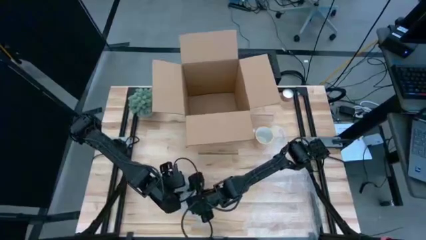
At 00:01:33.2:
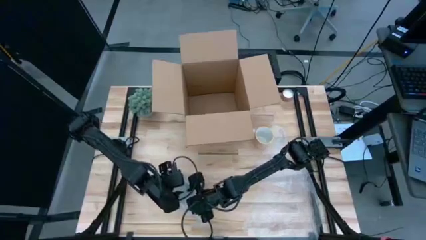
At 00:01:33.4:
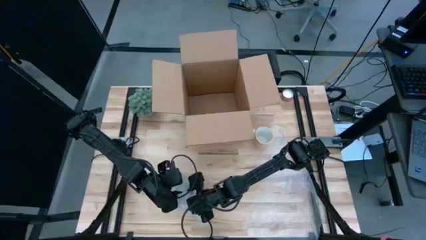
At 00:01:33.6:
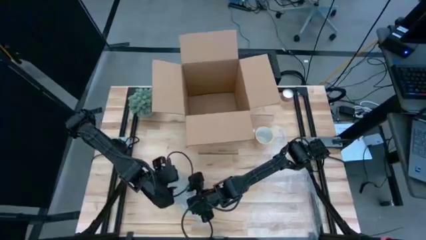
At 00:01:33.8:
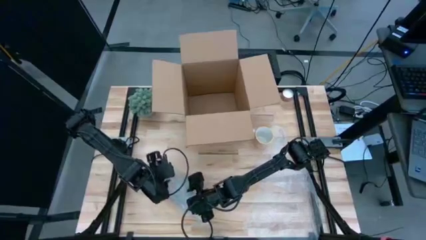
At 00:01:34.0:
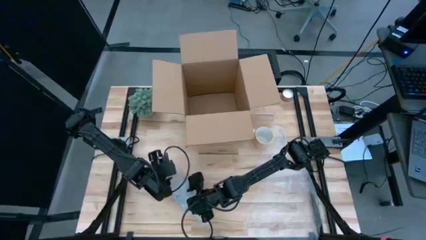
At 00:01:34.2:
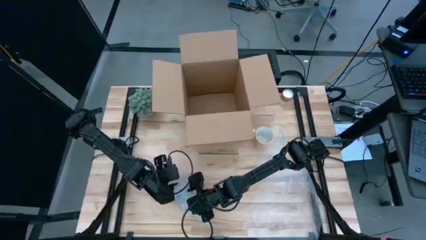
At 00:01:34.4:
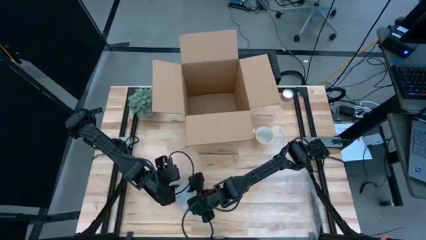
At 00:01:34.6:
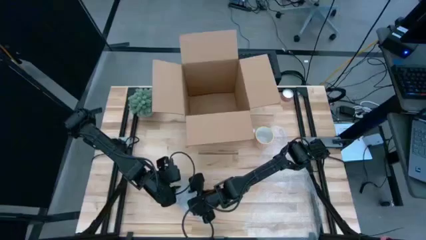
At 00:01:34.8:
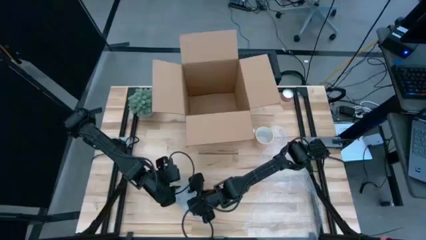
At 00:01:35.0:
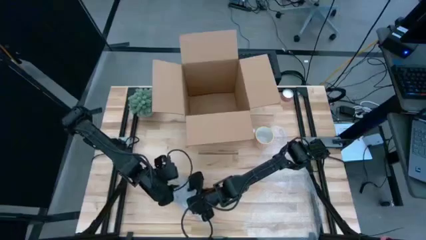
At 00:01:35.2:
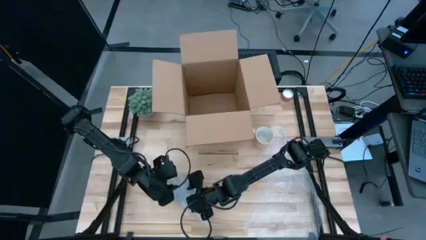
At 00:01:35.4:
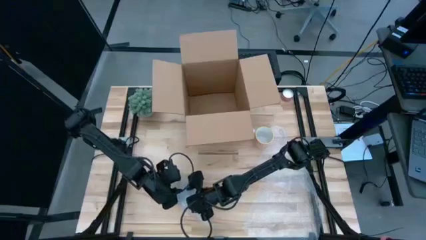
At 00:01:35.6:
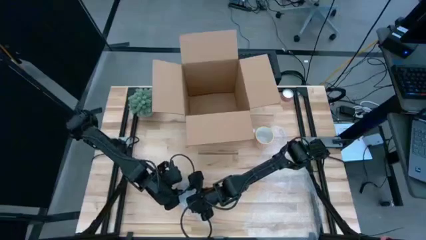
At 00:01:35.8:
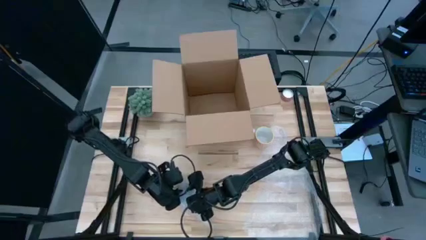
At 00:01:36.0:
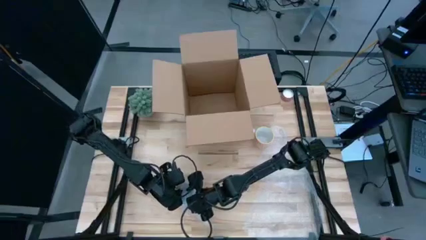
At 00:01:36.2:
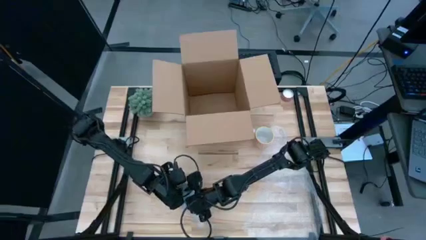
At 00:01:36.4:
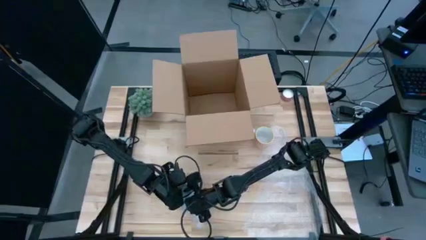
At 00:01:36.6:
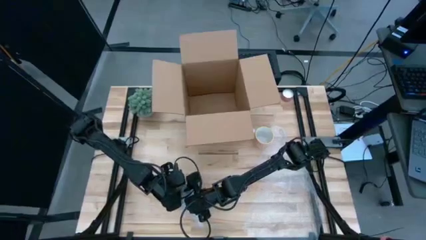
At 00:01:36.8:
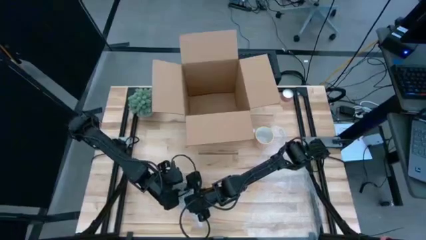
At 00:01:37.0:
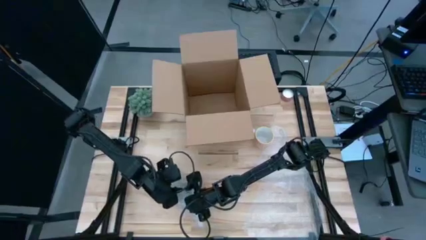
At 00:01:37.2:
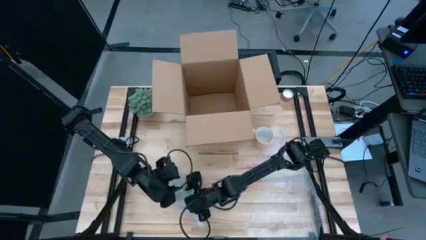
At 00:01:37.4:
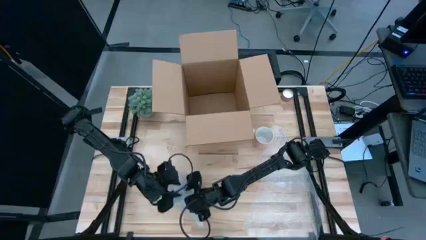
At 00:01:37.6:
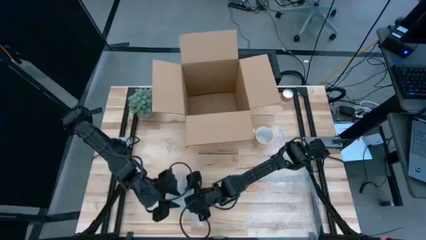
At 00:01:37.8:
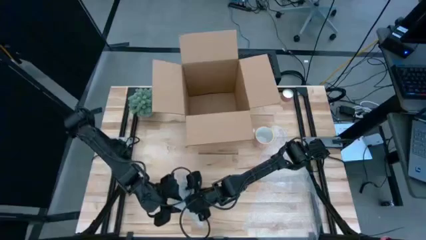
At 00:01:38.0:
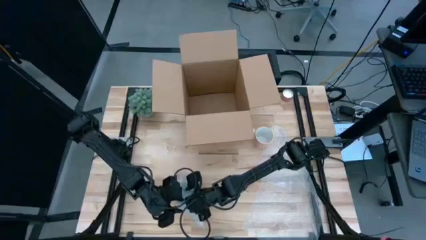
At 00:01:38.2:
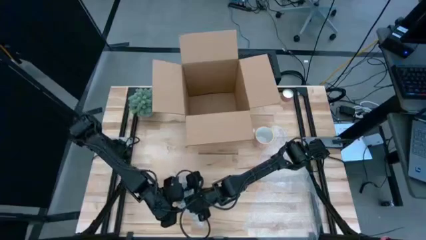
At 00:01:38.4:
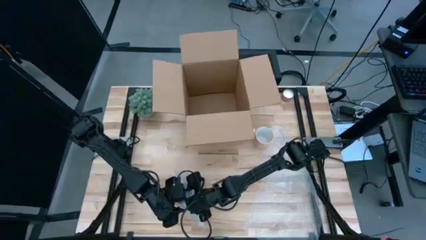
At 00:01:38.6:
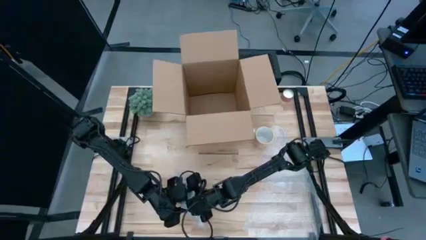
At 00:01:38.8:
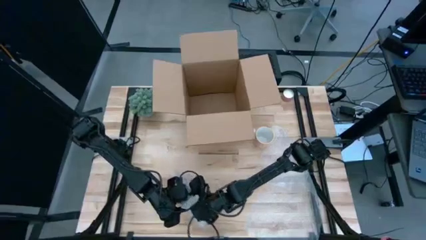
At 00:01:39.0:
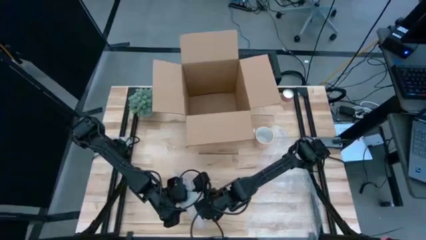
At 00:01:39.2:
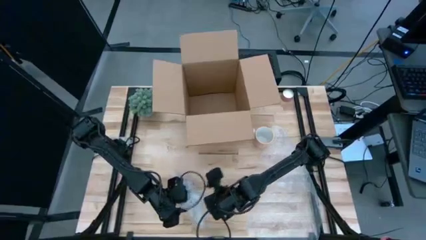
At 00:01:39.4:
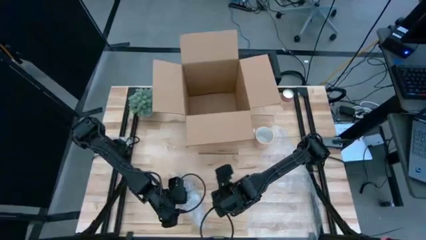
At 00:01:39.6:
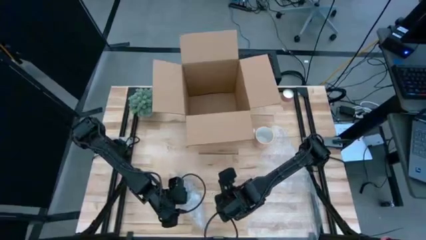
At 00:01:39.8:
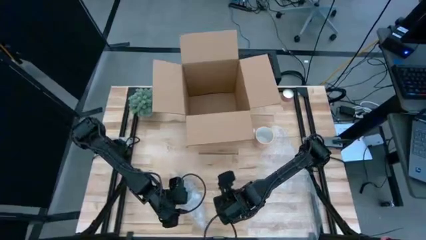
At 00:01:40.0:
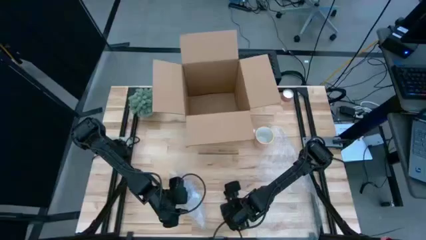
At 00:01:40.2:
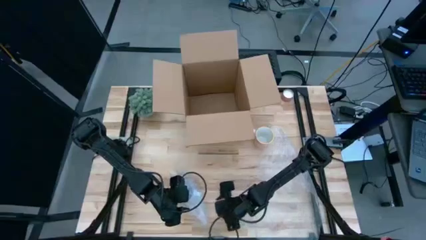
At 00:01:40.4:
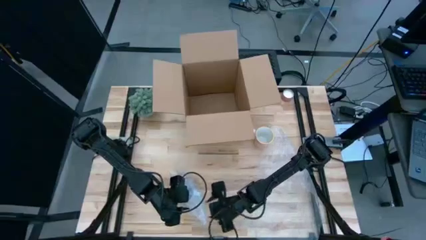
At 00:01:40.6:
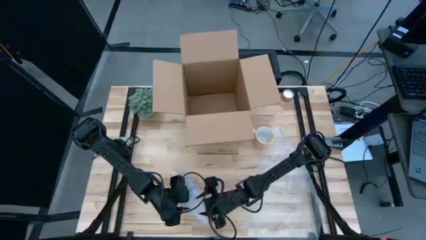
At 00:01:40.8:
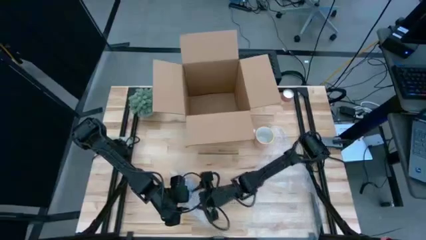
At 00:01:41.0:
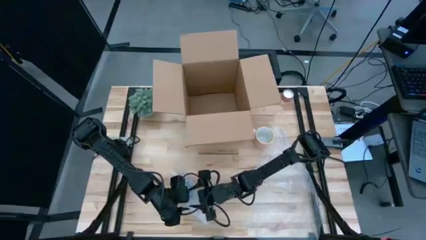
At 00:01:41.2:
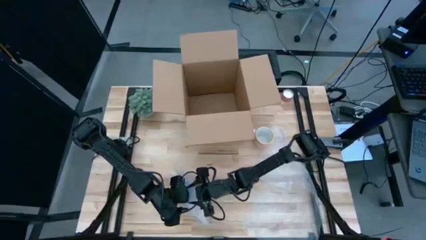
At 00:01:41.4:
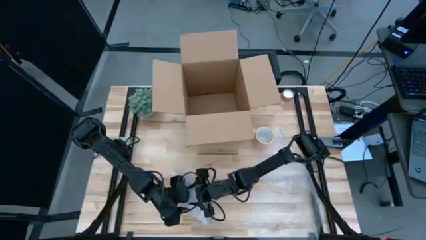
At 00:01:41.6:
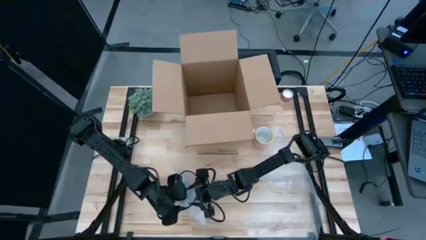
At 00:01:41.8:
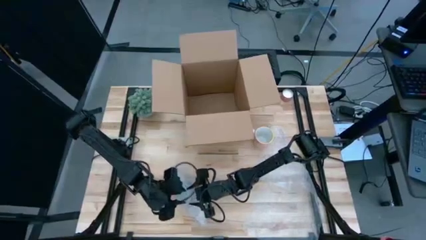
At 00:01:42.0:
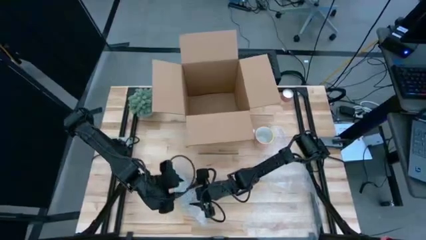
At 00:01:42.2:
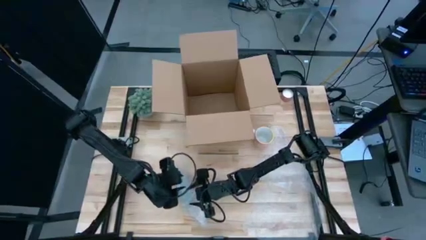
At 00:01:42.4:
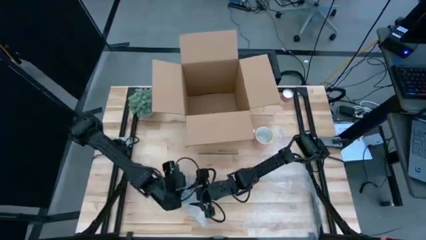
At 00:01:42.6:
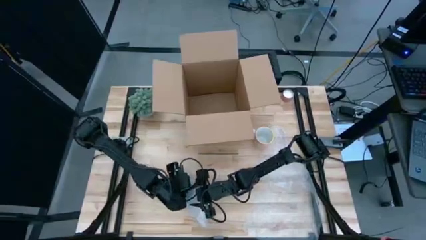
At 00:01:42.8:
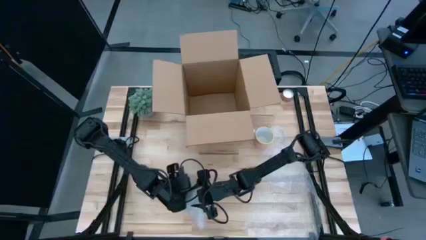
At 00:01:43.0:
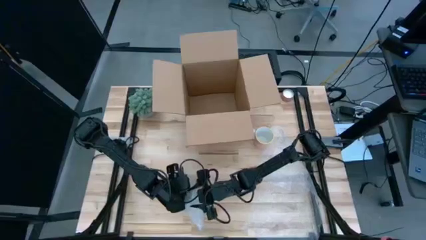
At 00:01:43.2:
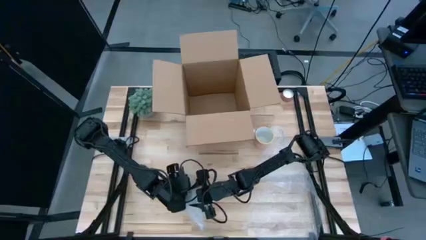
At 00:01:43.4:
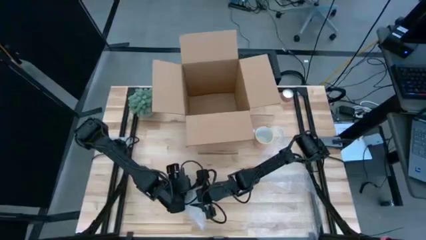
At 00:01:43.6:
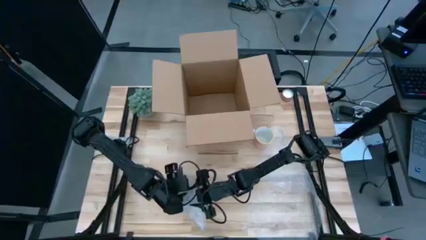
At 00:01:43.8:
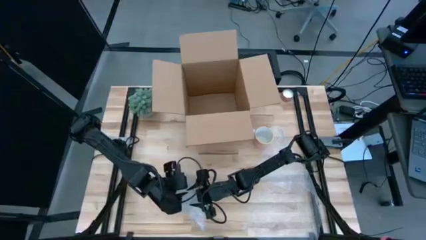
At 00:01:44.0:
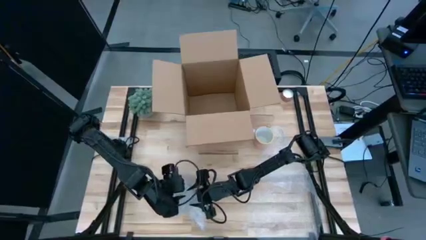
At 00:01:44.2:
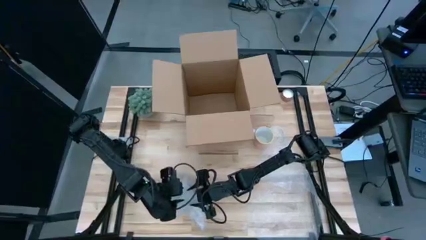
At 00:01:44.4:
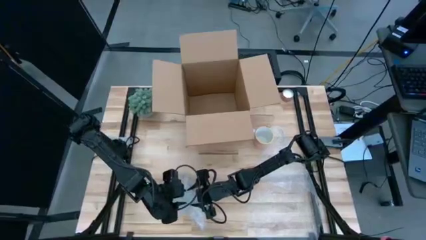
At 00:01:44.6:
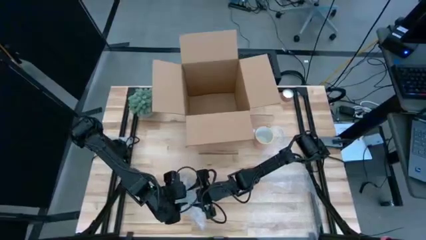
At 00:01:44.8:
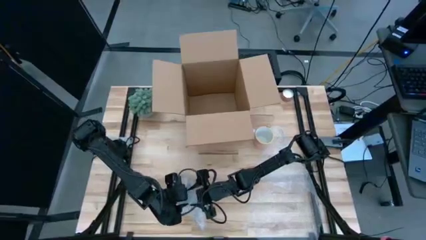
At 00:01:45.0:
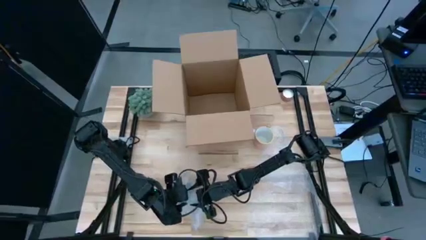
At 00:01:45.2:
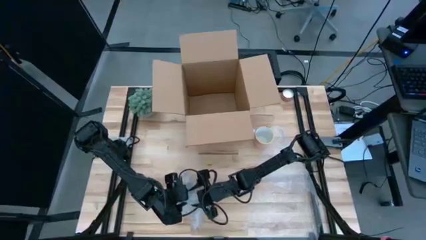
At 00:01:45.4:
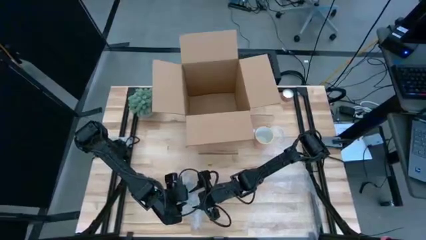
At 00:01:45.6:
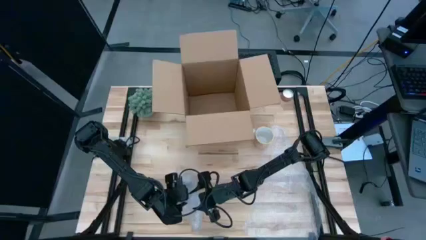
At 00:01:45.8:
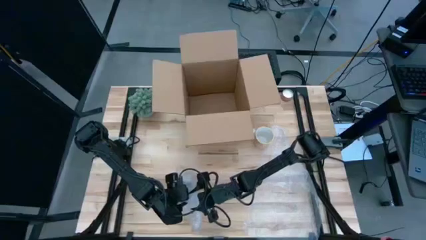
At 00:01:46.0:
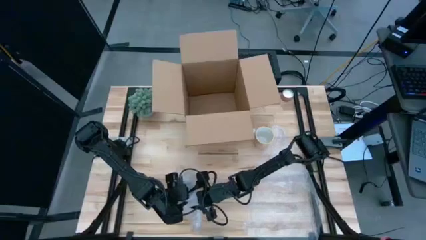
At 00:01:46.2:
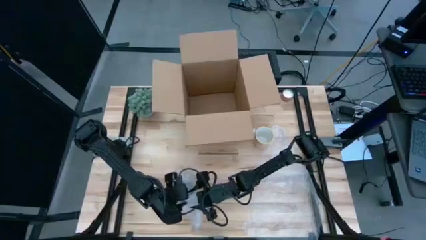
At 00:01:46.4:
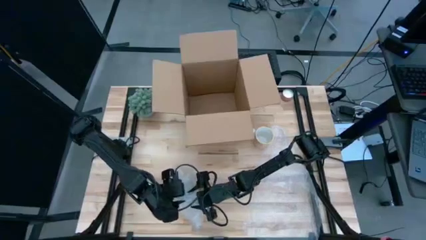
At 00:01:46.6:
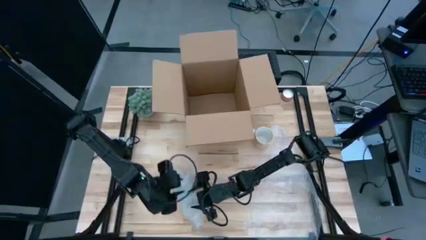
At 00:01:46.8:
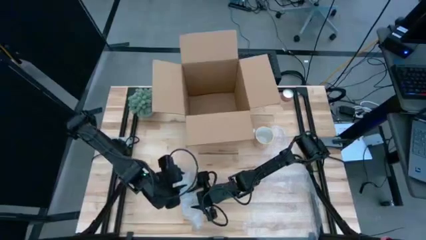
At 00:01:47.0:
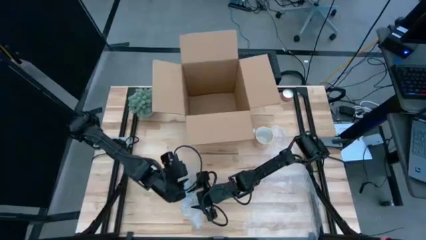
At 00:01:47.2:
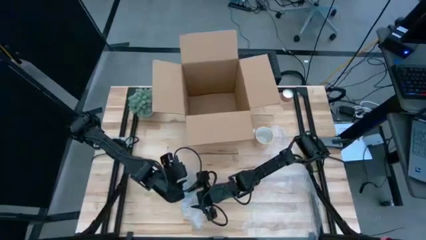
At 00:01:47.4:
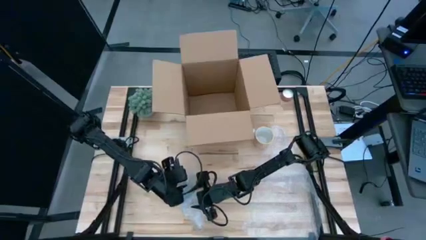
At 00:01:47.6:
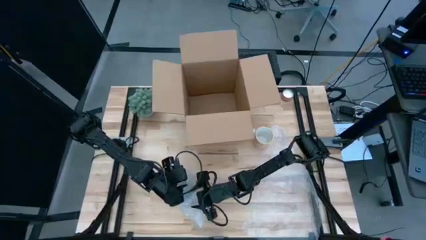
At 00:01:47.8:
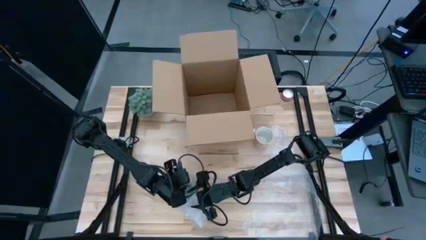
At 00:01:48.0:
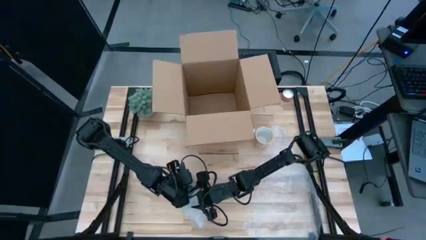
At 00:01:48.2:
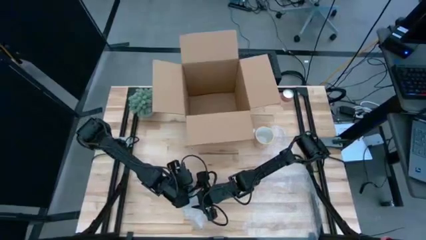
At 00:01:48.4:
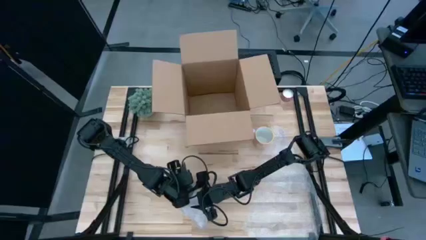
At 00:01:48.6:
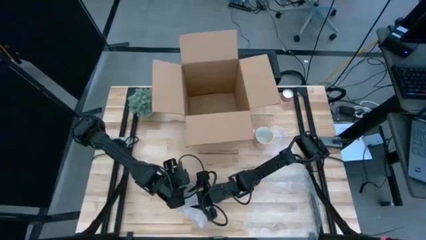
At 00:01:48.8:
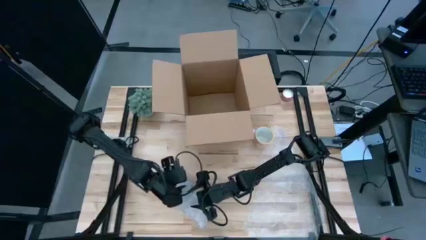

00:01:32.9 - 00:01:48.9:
Task: wrap mug
Wrap the red cup in the bubble wrap
